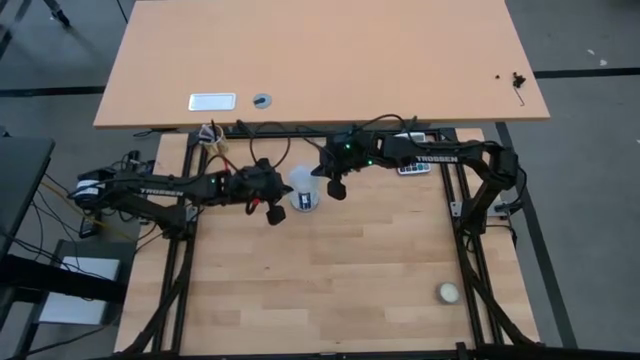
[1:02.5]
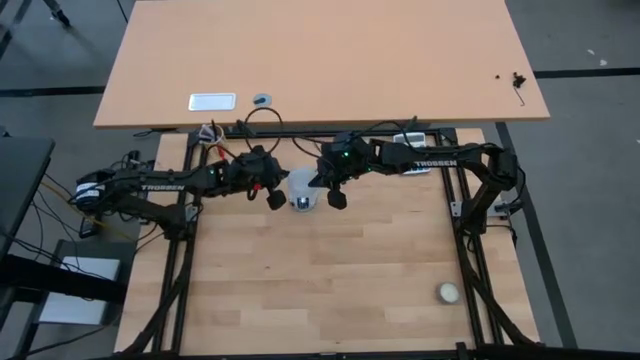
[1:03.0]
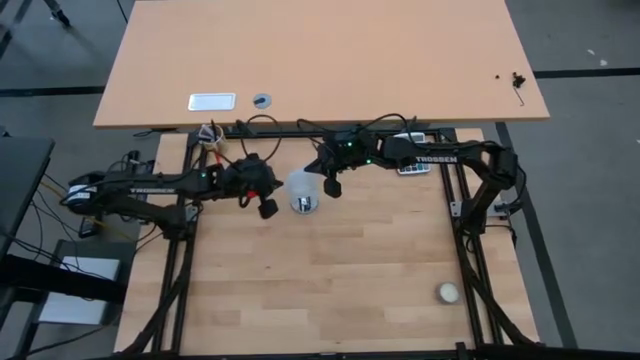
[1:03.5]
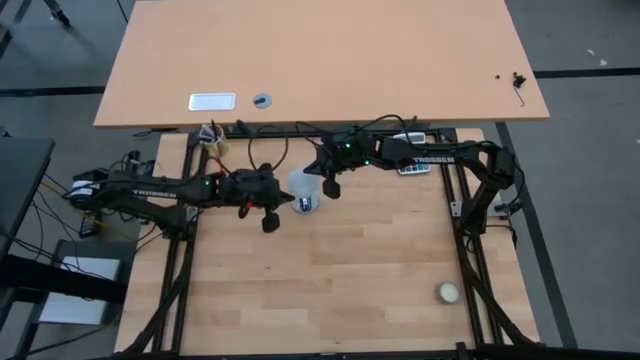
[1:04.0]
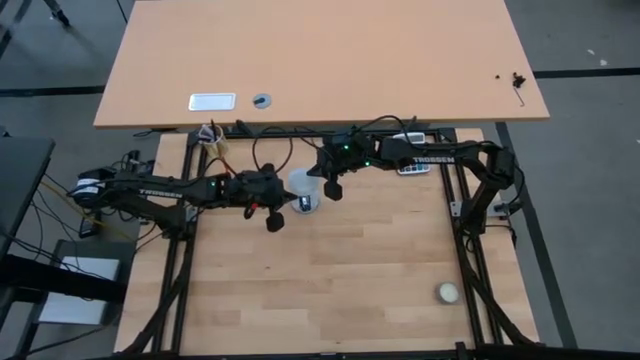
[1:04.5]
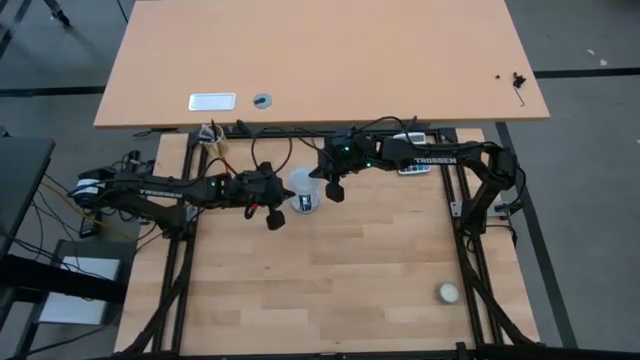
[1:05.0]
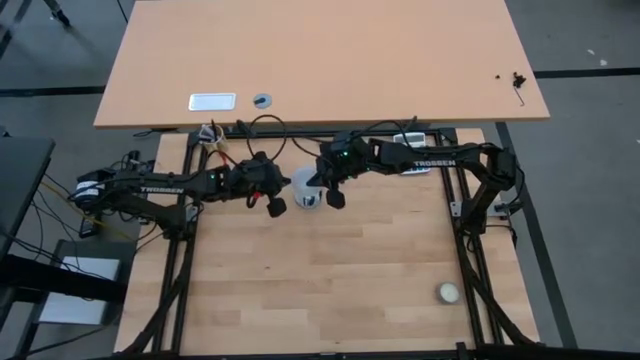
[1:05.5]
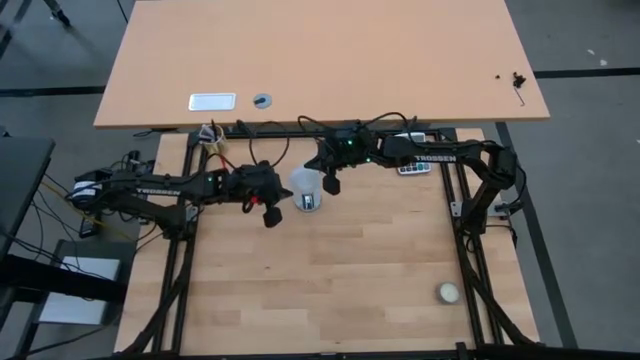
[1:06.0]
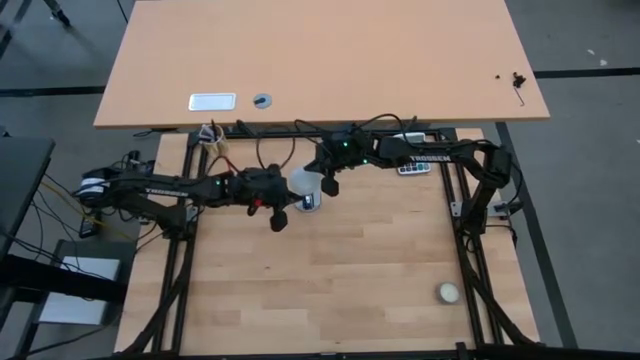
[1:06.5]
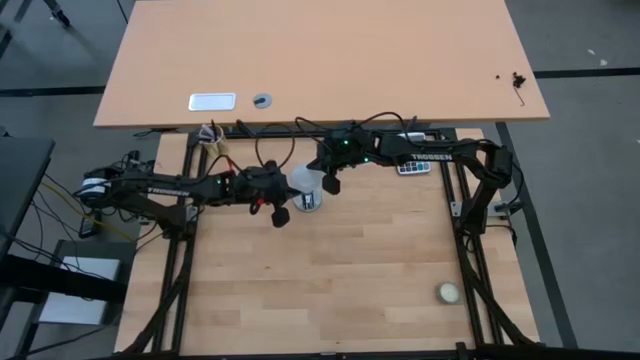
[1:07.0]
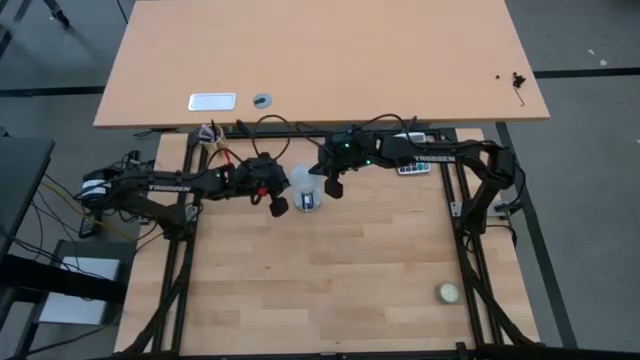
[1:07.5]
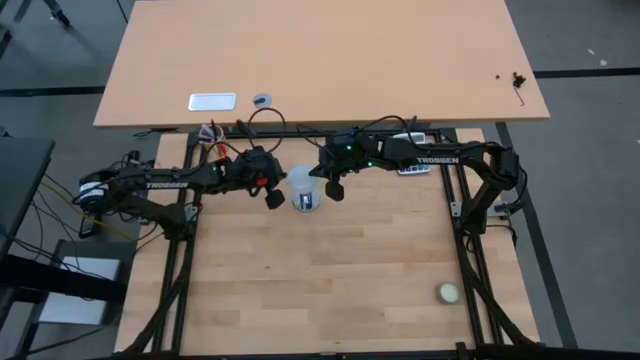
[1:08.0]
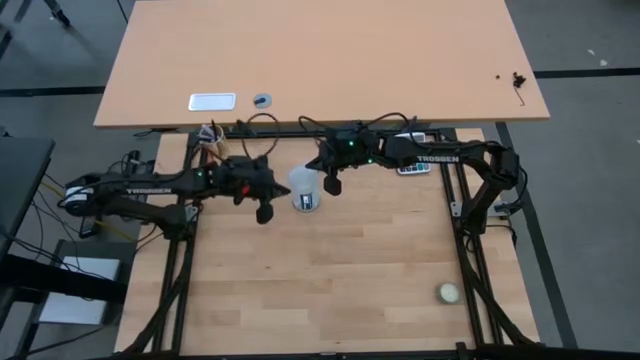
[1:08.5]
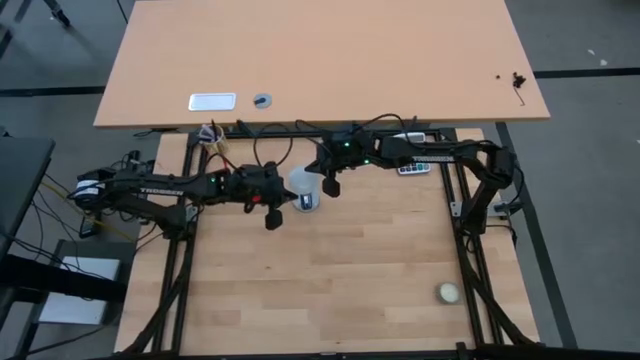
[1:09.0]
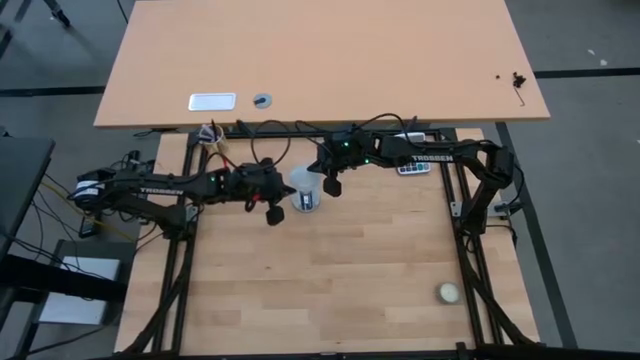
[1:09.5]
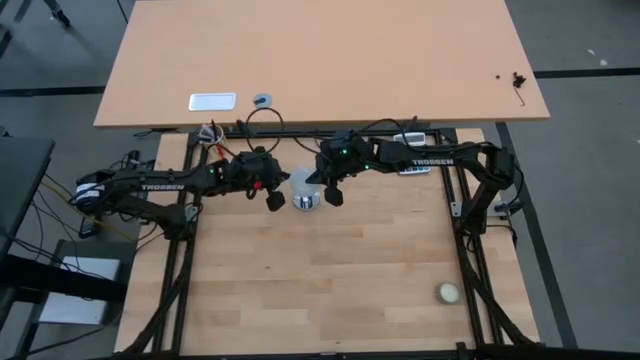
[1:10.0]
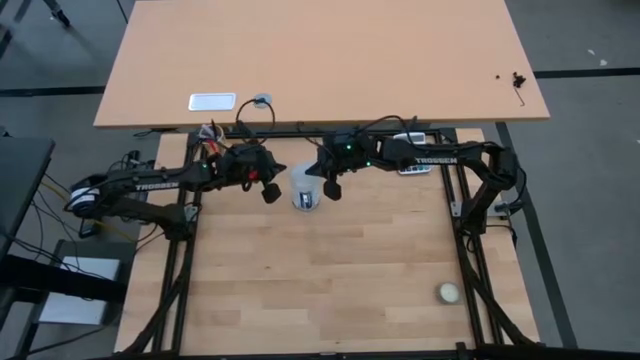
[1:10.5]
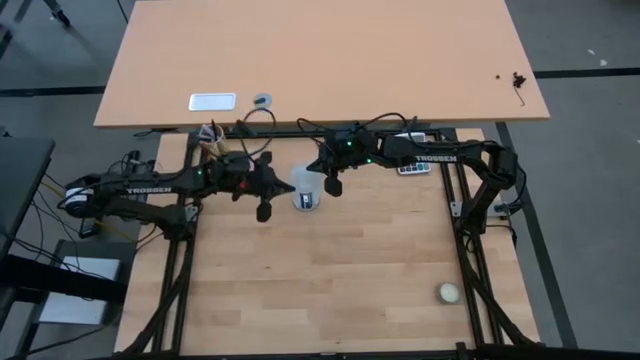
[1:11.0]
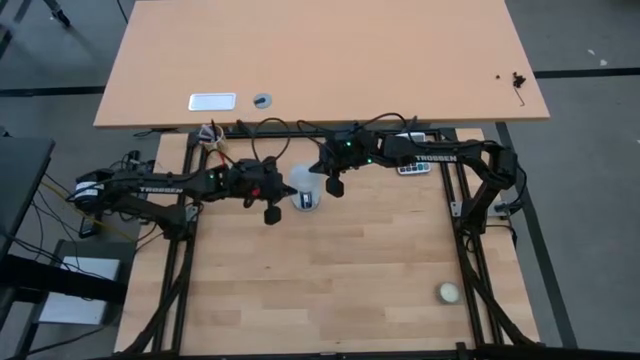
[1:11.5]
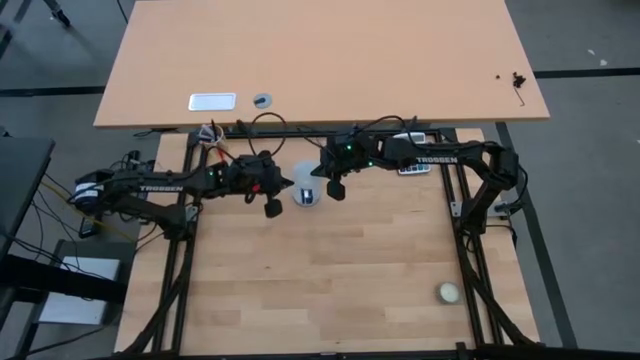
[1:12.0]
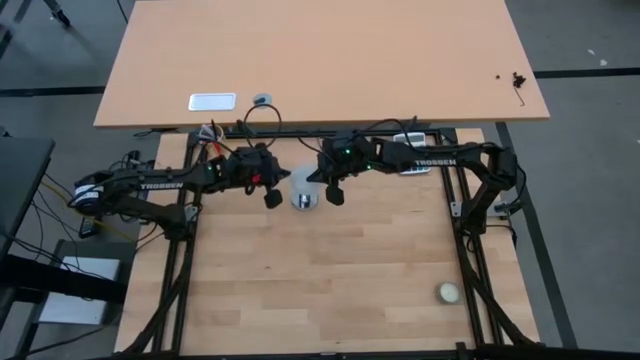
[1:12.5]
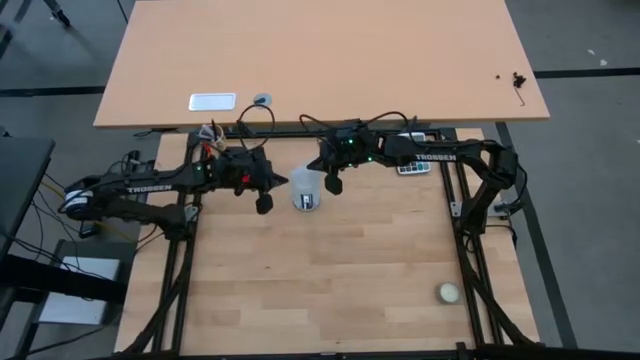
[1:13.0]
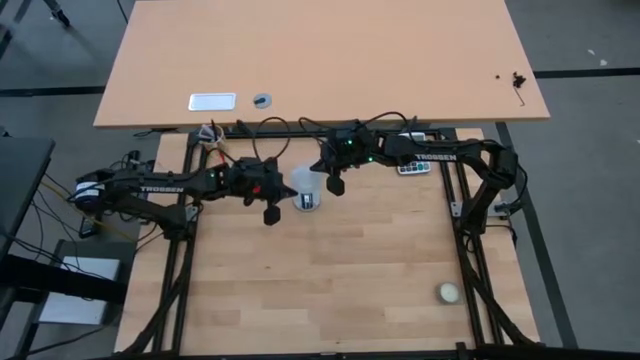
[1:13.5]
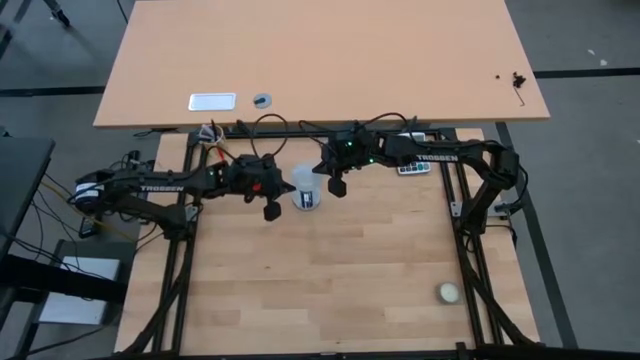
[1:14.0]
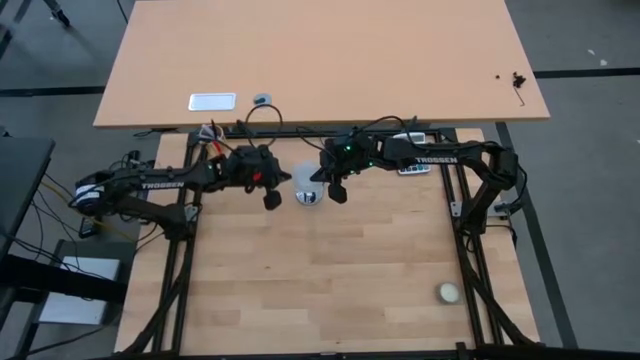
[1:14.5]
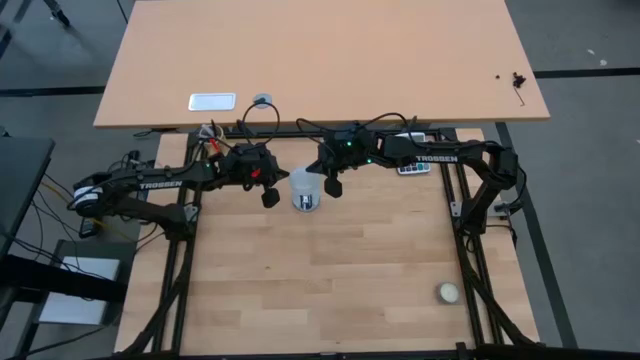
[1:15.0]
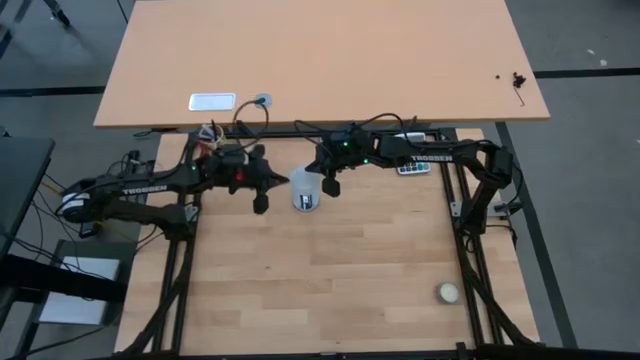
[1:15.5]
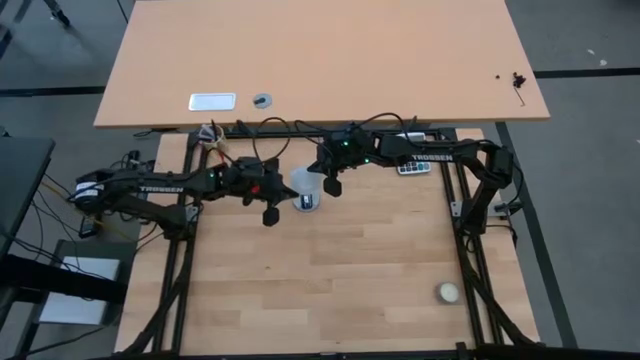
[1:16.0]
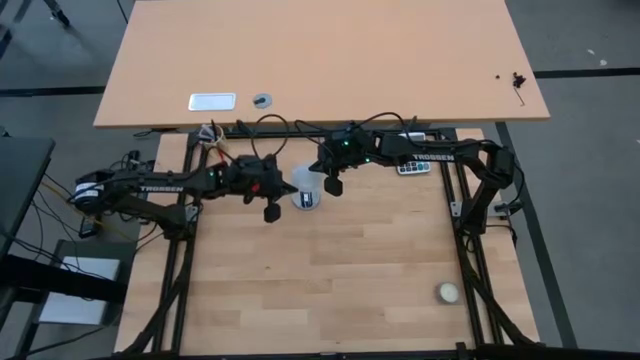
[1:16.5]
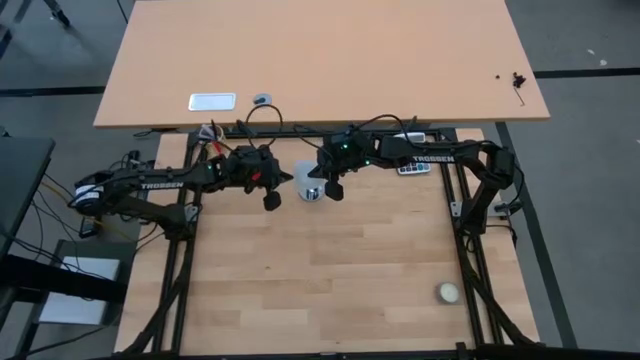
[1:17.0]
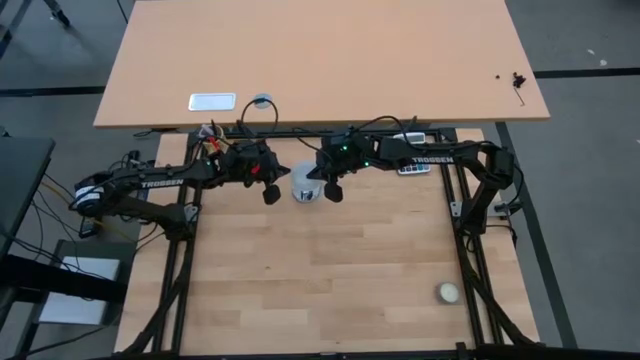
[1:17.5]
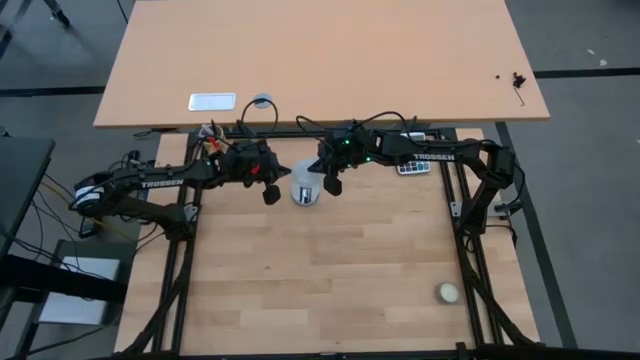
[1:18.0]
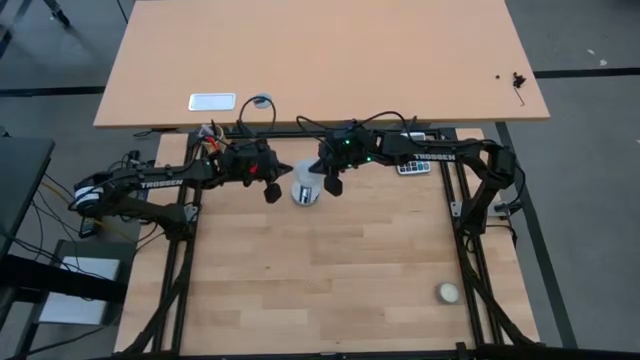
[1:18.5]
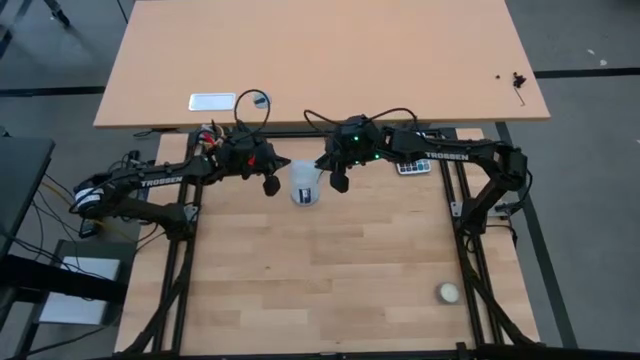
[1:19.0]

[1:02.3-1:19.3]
Task: Screw lightbulb
Insert the white lightbulb into the silver lamp

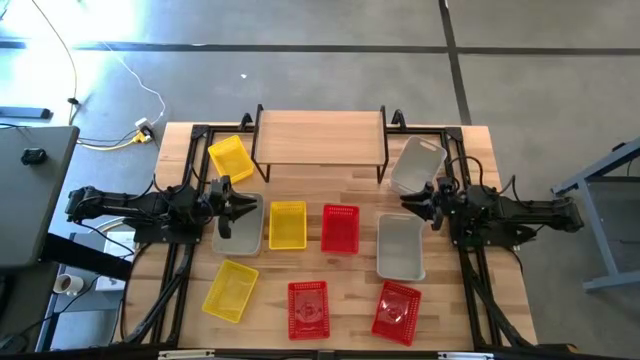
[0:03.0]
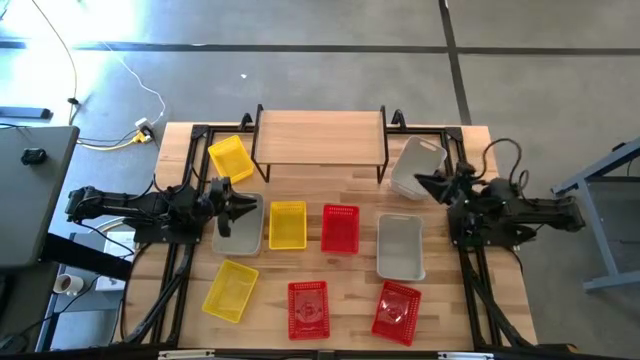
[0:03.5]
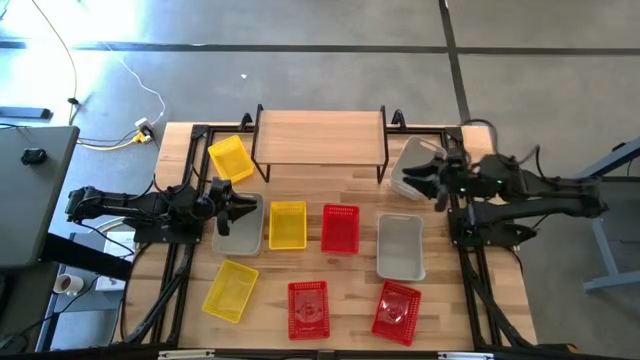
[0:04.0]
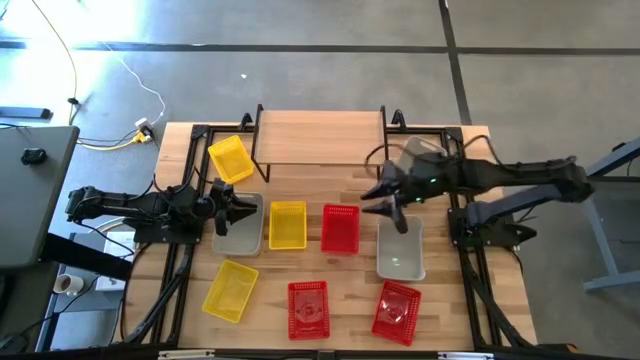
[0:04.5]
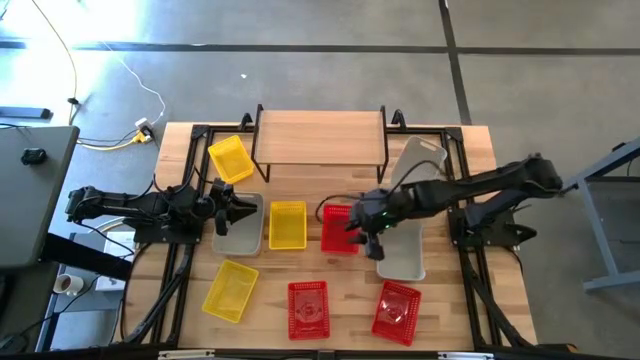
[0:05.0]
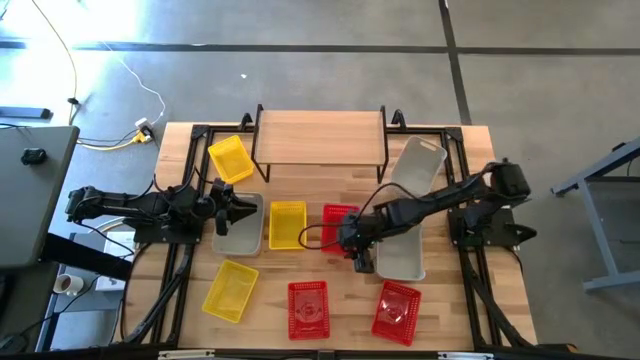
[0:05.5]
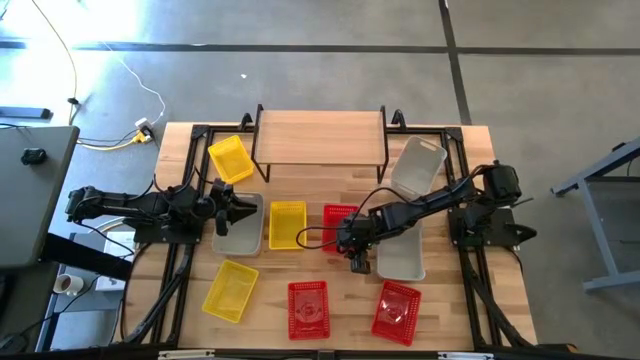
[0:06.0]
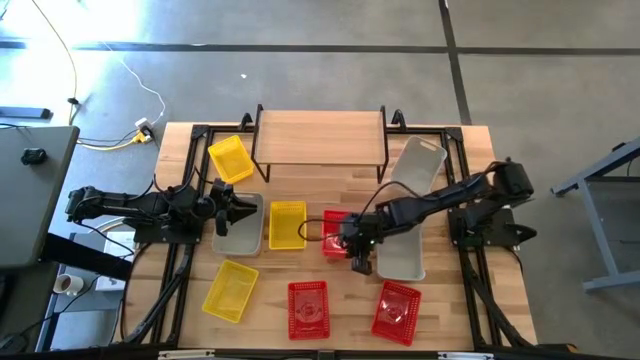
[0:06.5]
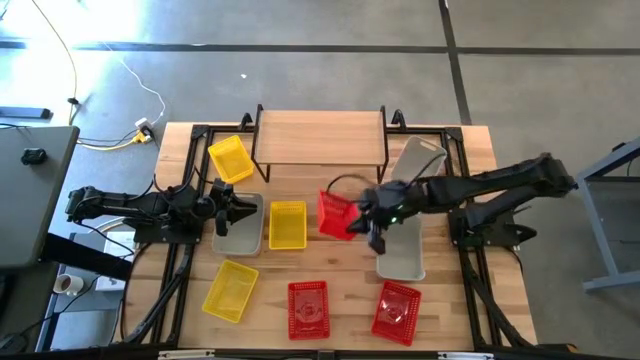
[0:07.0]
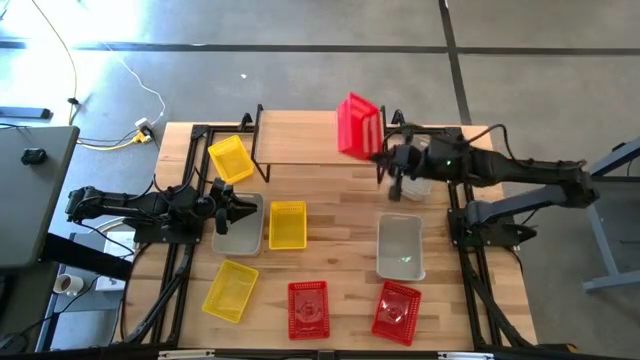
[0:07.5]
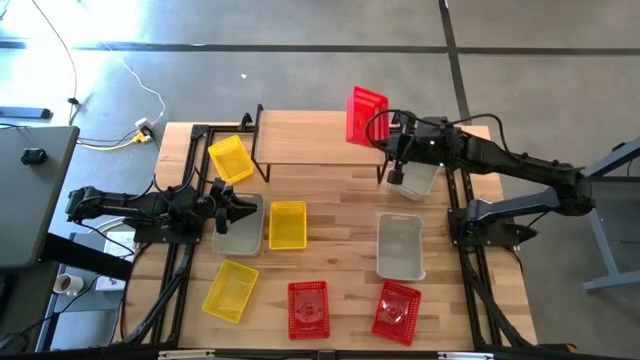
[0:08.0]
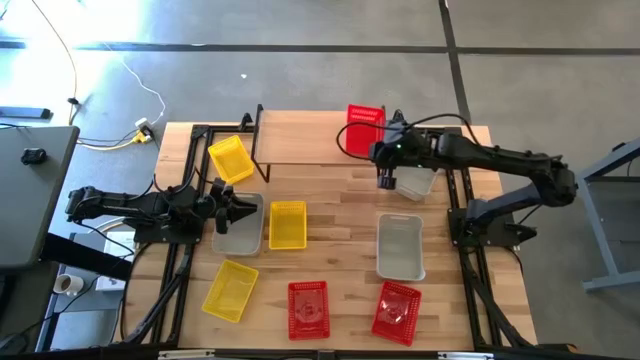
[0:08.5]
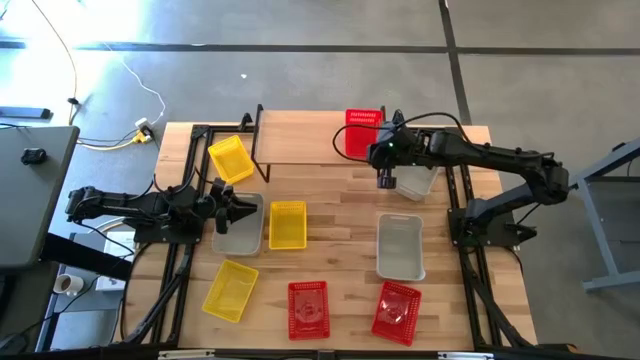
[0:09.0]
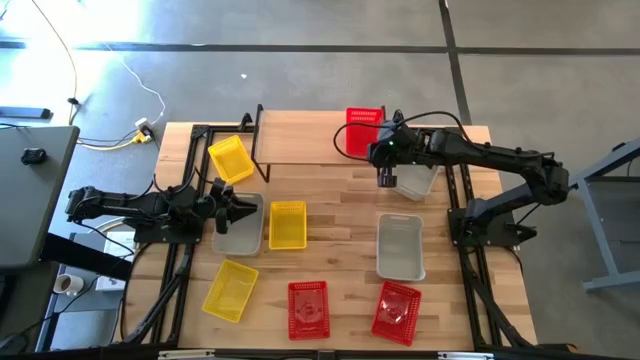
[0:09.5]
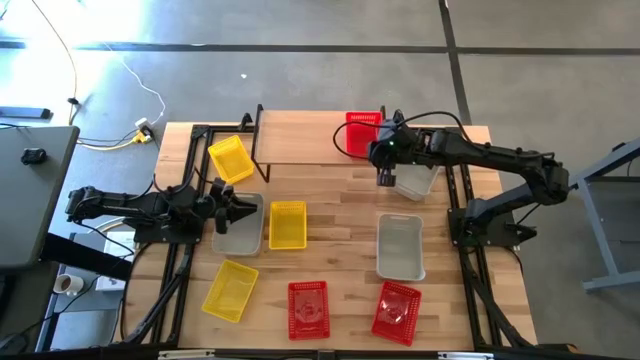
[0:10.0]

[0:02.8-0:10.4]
Task: Stack baskets on shelf by color
Put the top center red bin on the shelf
